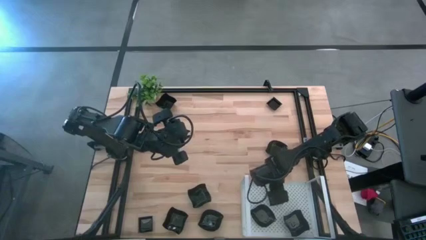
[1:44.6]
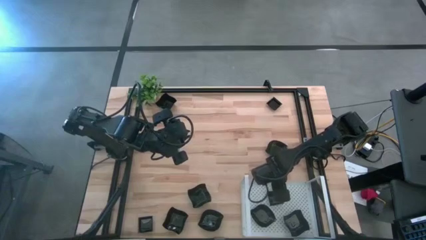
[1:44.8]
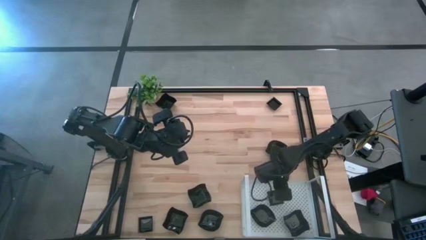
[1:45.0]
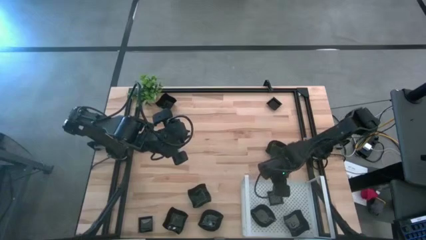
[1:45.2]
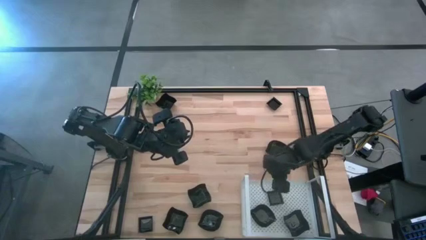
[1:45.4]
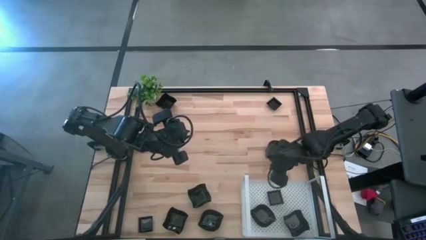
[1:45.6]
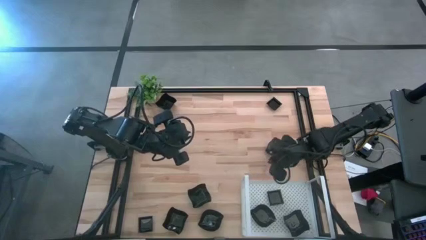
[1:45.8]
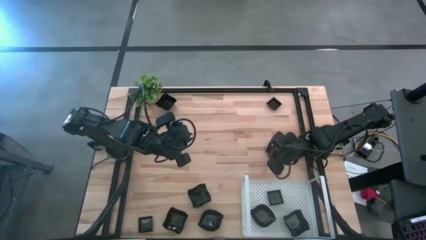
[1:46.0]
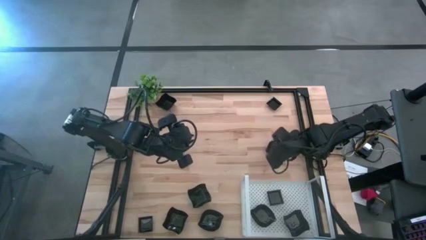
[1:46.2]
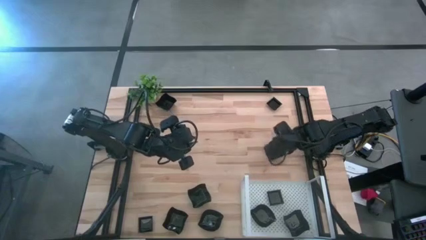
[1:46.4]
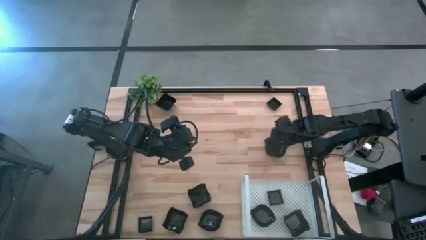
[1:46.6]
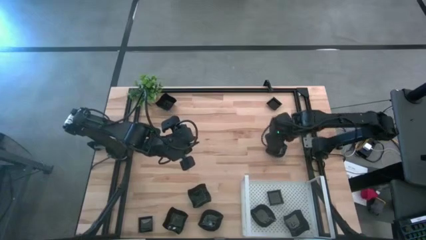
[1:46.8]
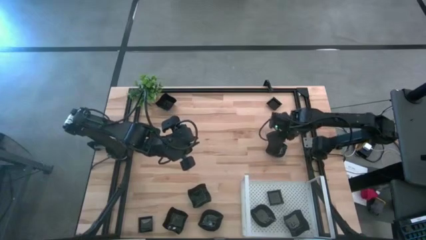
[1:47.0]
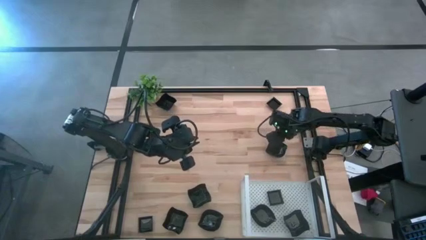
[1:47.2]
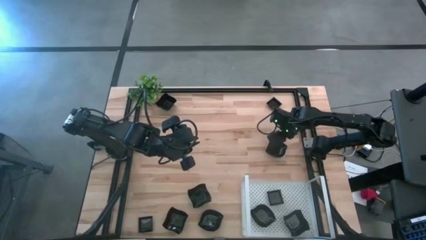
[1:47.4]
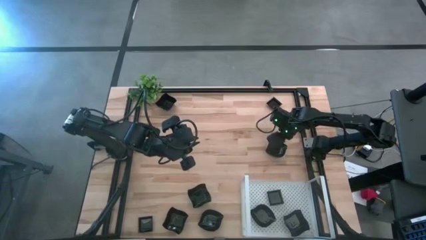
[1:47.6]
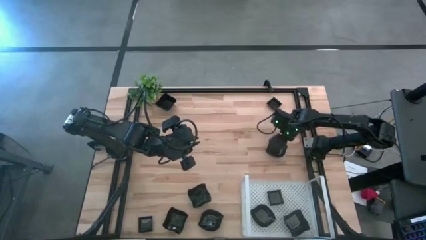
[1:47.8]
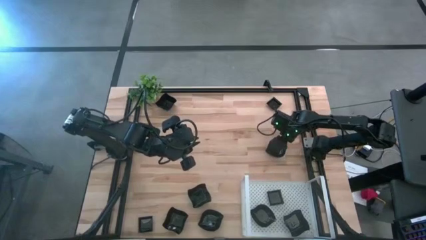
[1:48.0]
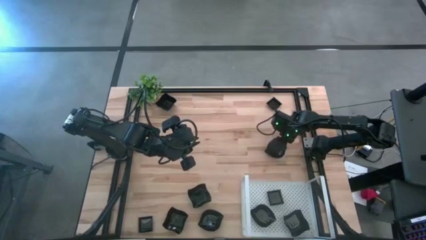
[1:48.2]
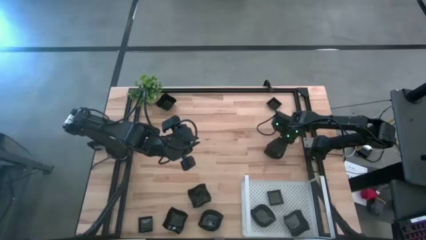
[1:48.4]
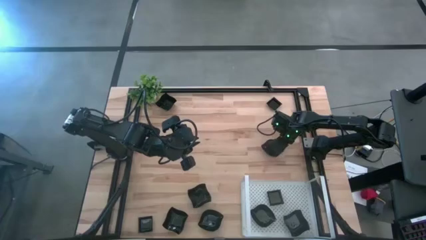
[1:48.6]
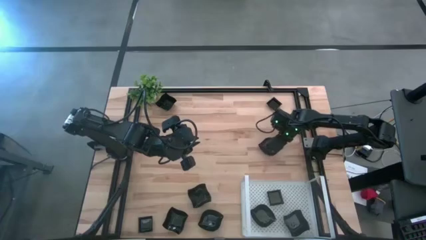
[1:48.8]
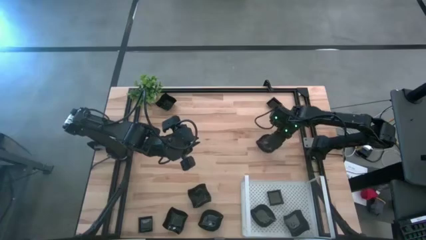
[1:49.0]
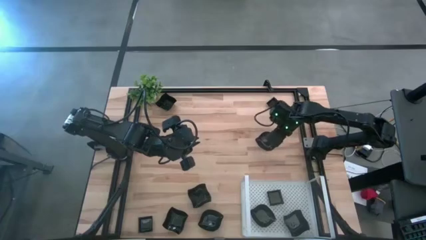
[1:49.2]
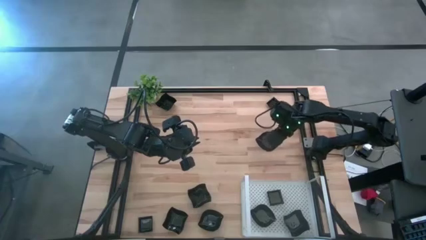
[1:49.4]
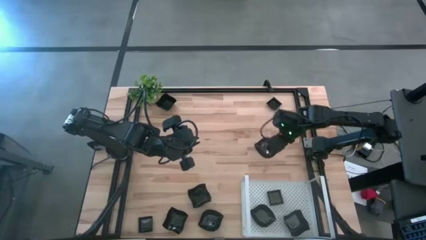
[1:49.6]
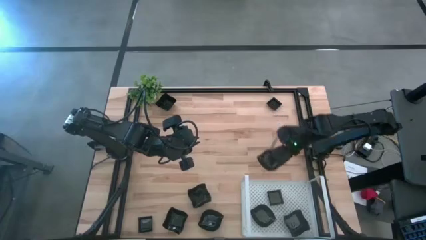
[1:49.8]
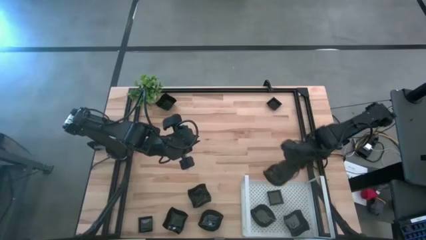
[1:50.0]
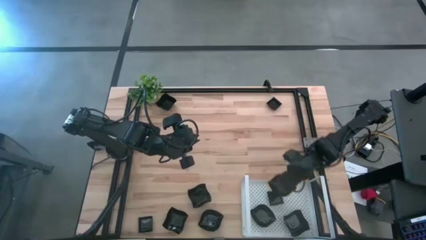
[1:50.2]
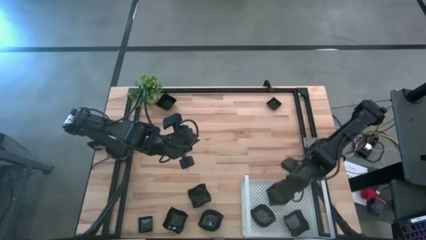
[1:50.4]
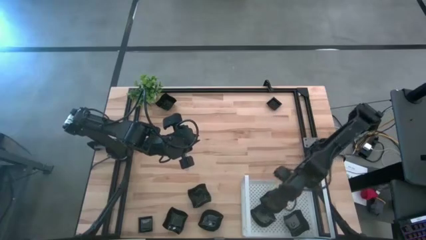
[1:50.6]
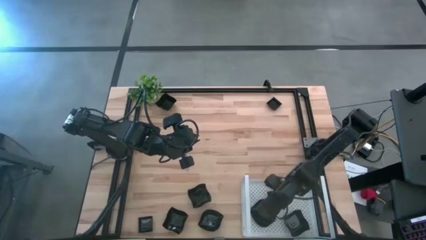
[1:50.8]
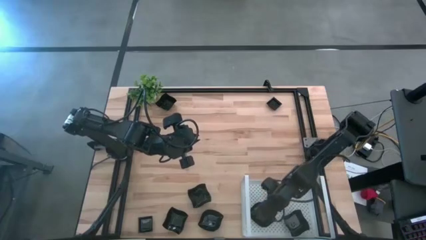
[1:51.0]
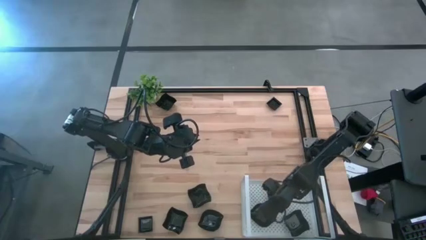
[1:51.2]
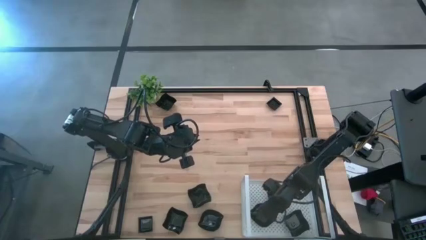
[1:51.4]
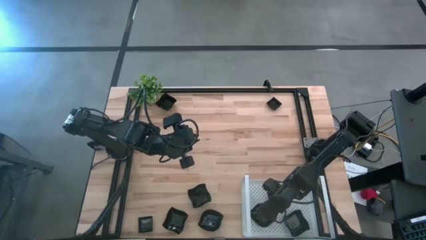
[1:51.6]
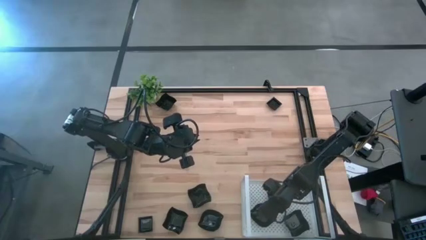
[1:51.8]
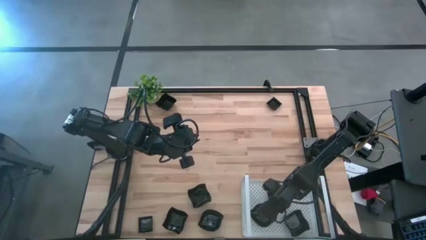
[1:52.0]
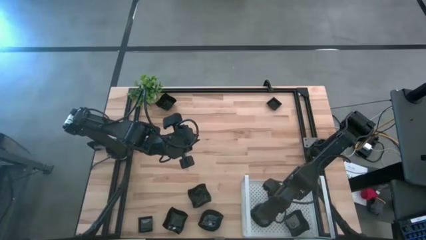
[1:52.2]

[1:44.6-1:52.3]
Task: Pick & Place Mini shaped plates
Stack the leaf shaped plate on top of the other leaf shaped plate on the shelf

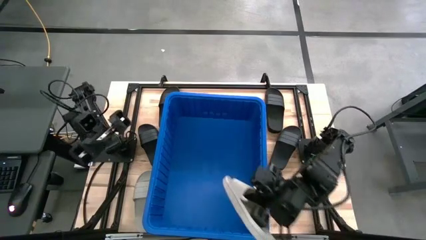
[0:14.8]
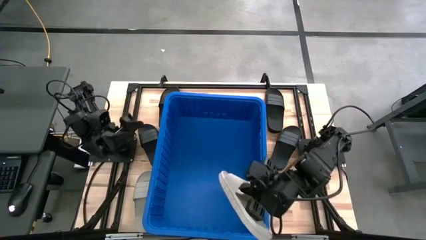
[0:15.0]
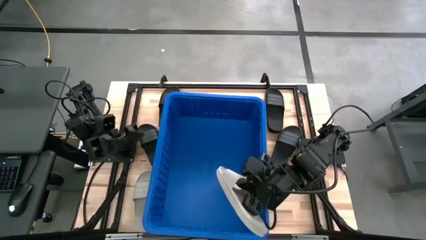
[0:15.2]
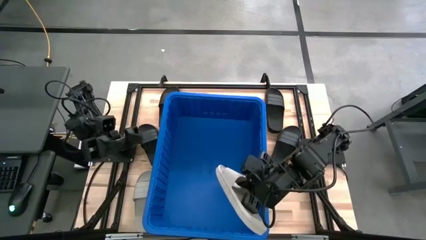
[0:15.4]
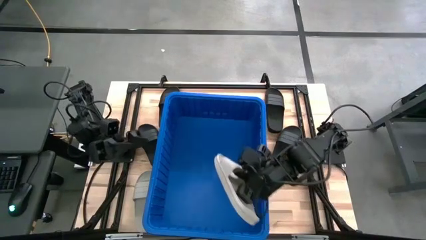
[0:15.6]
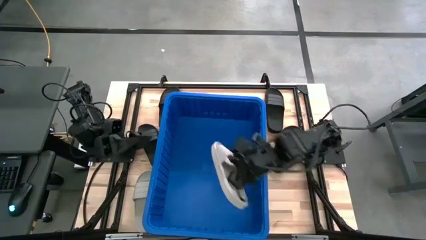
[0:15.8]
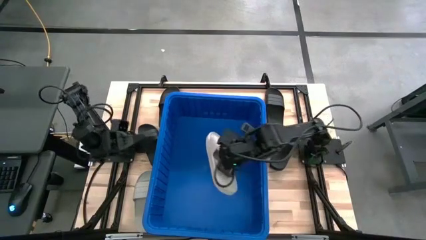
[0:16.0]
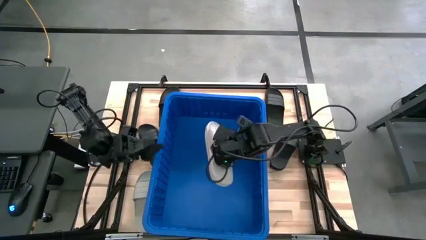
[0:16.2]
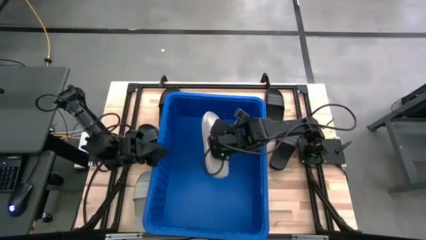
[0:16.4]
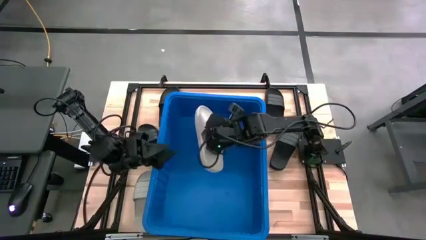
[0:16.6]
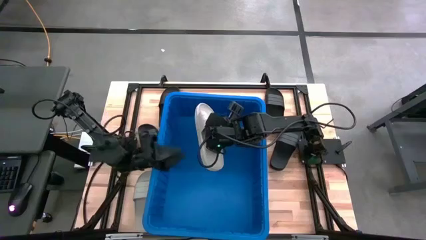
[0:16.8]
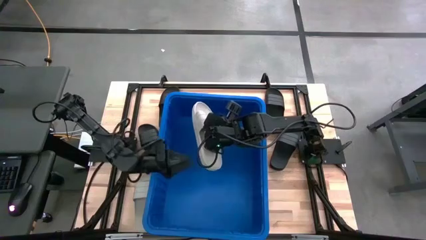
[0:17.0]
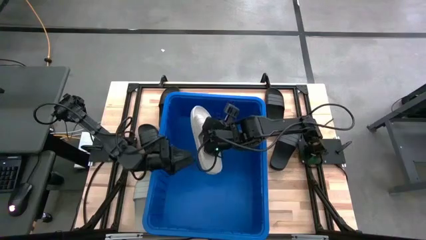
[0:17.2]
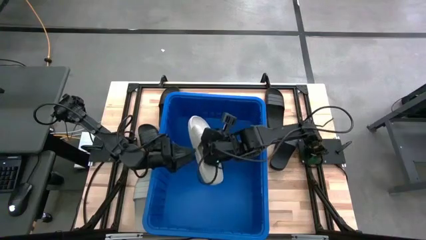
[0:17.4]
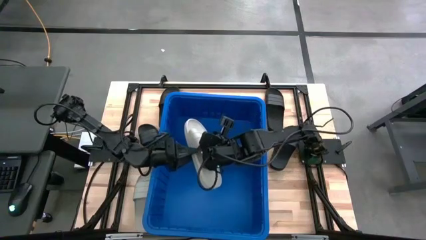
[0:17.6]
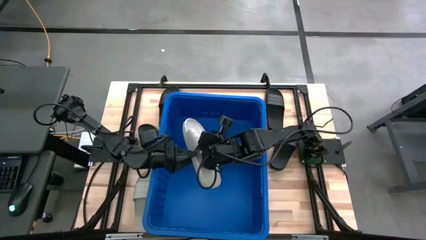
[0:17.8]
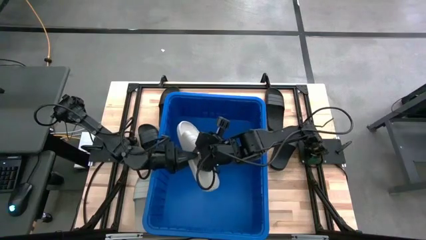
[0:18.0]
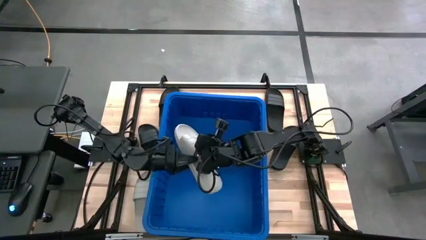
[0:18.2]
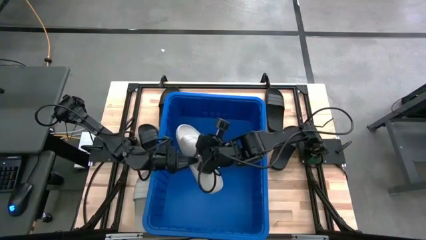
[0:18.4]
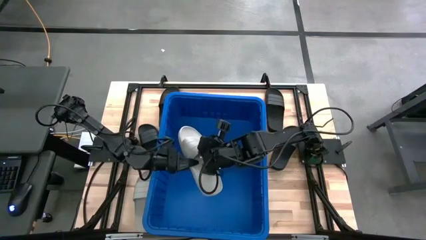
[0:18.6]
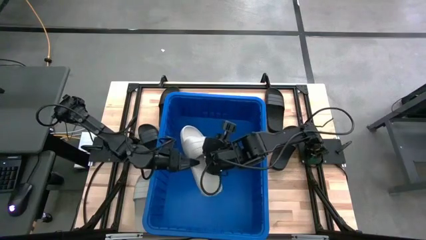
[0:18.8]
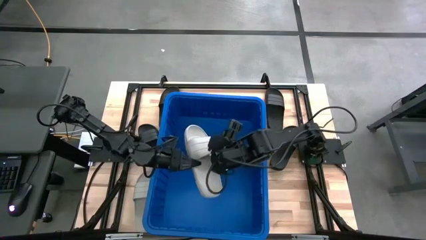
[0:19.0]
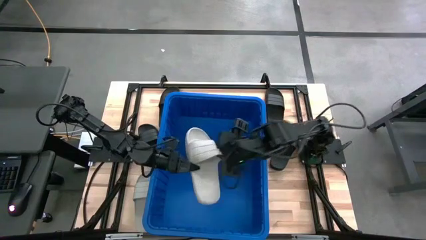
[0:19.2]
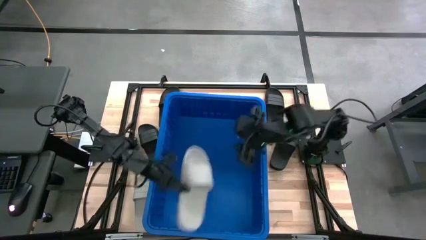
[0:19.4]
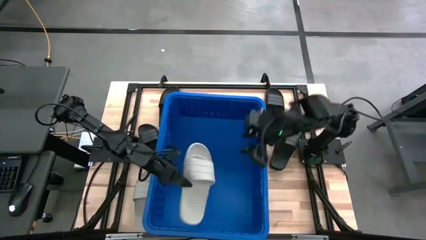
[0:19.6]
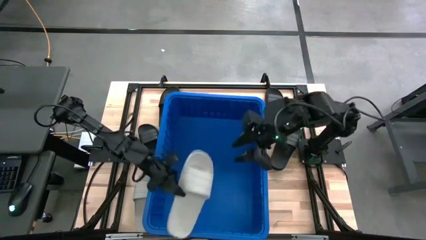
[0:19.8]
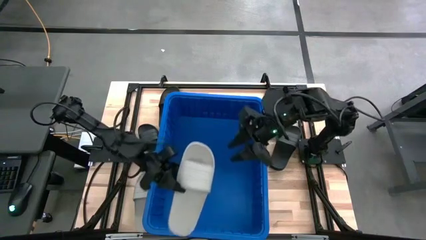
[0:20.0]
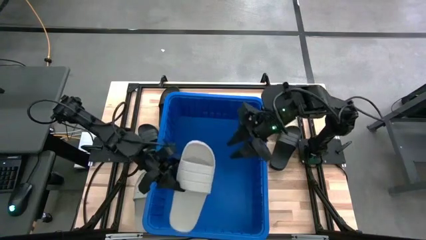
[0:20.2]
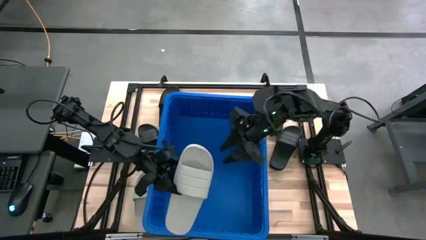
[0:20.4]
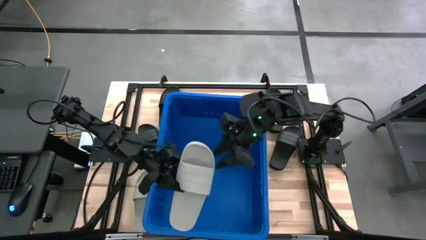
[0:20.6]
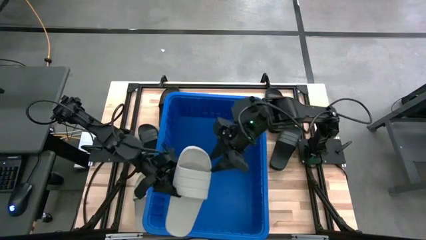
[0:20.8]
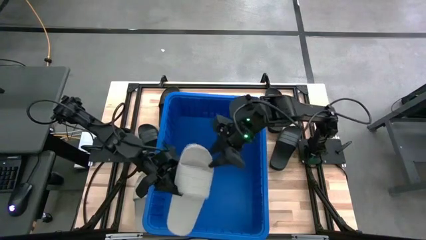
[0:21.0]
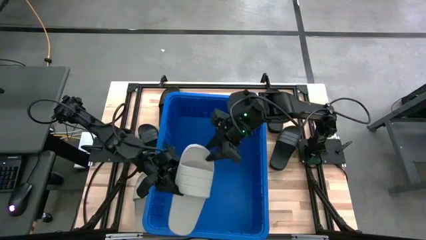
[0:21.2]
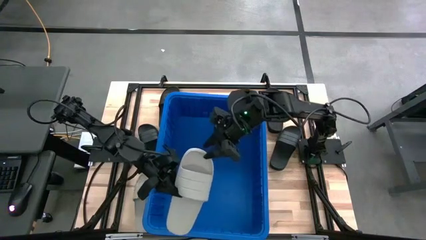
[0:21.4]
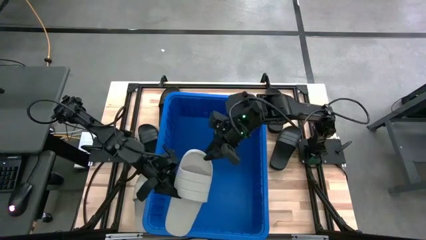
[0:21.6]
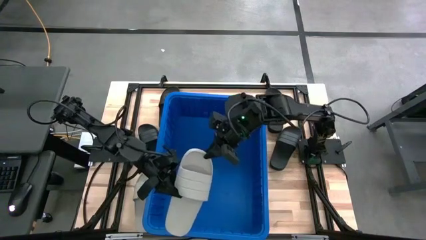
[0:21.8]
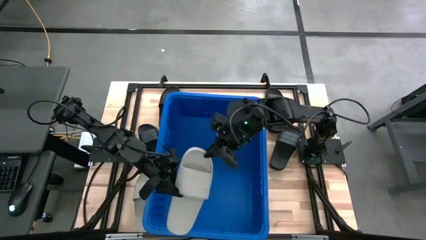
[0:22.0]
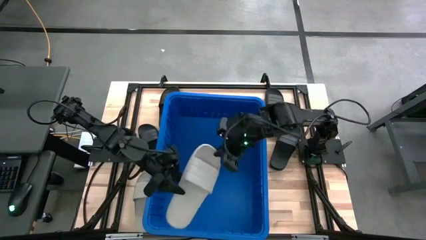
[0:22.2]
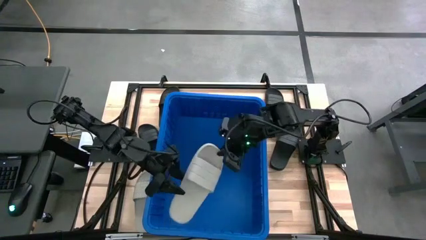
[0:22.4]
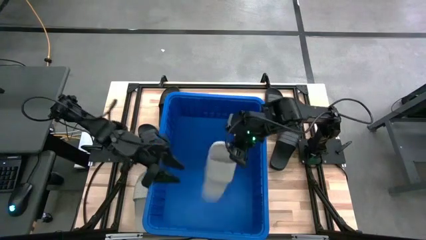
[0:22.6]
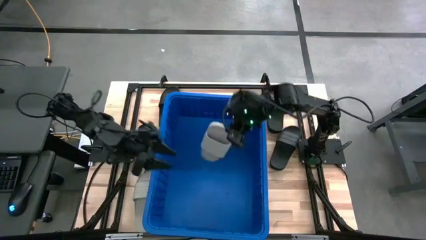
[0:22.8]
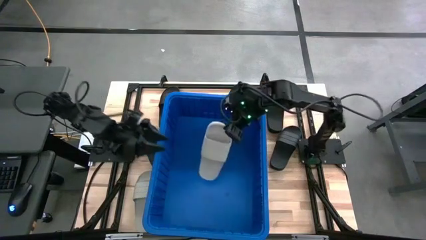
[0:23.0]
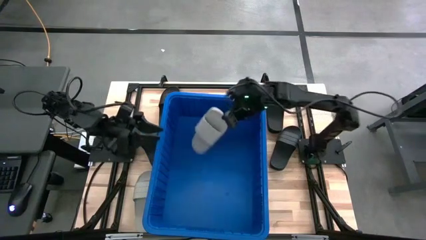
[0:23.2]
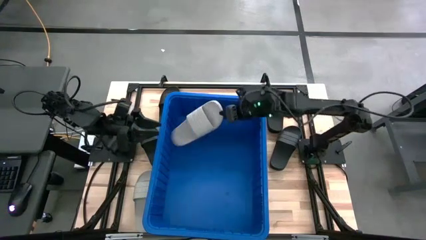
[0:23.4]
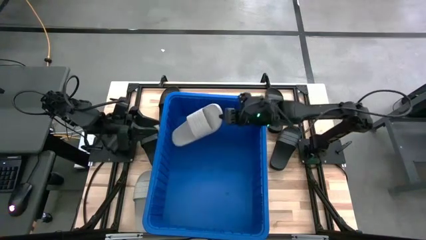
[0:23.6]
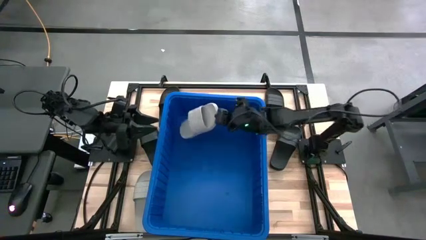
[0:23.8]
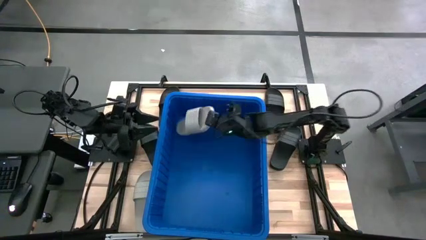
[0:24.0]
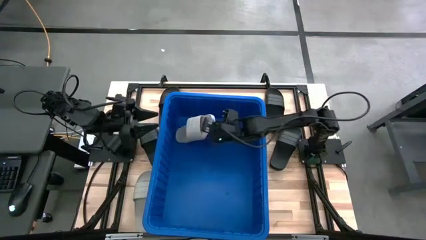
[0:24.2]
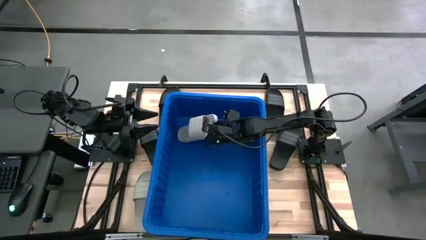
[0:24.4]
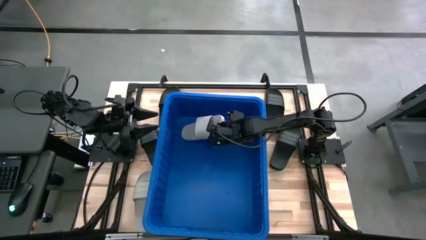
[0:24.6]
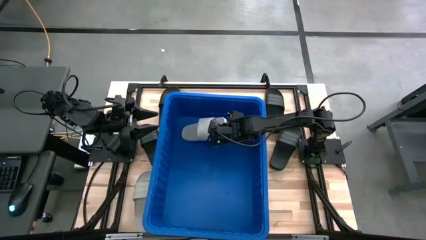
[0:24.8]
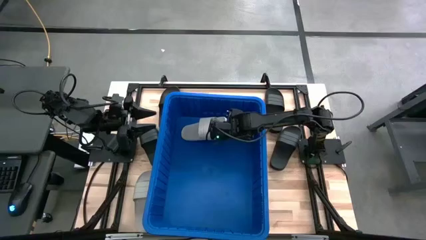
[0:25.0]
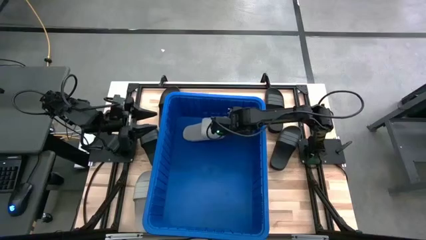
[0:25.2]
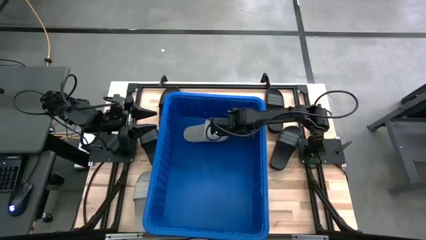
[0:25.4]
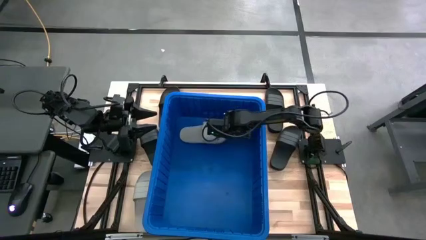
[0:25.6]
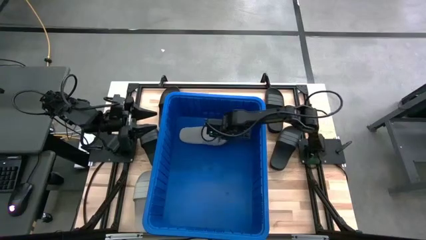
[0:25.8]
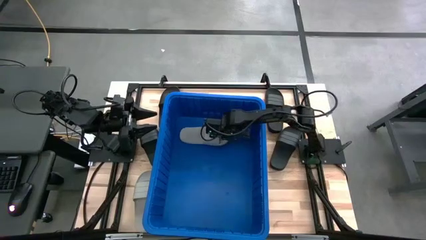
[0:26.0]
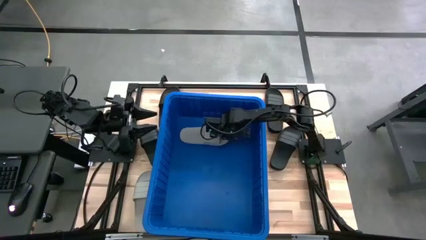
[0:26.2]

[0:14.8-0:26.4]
Task: Pick and place slides into bin
Put the gray slider into the blue bin
